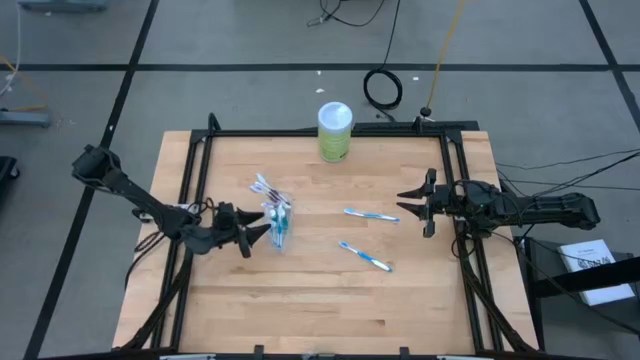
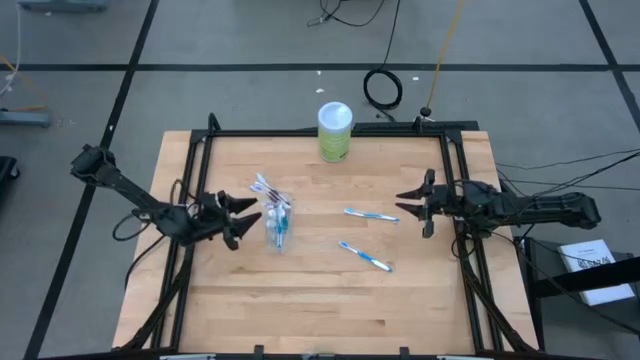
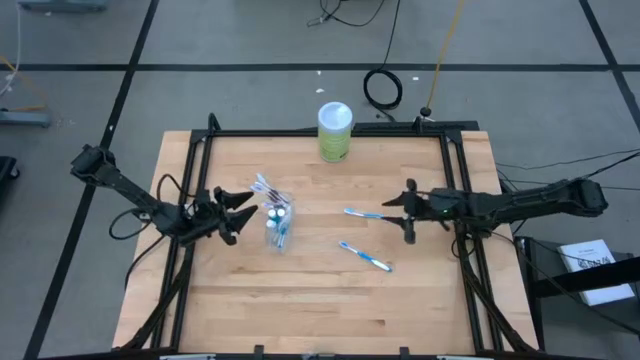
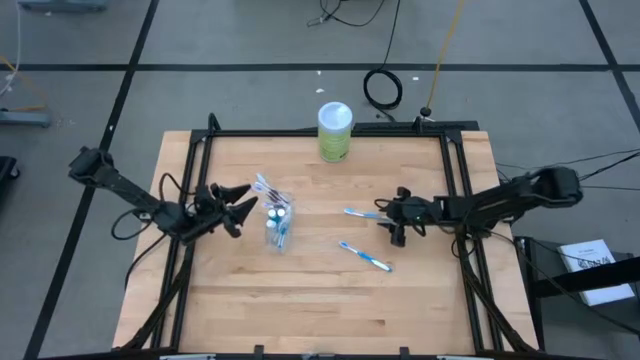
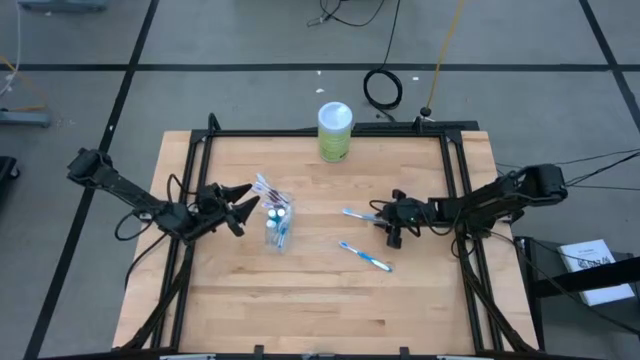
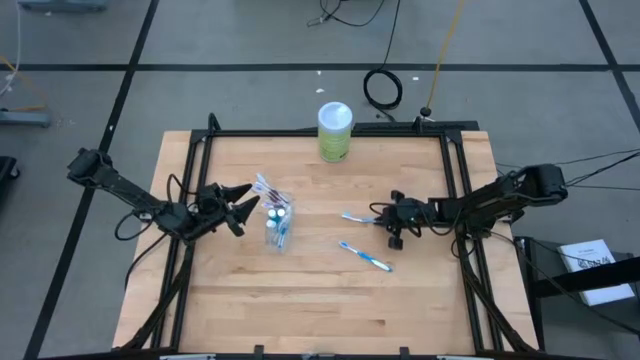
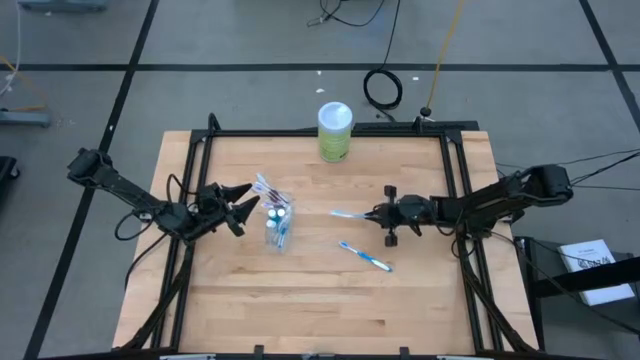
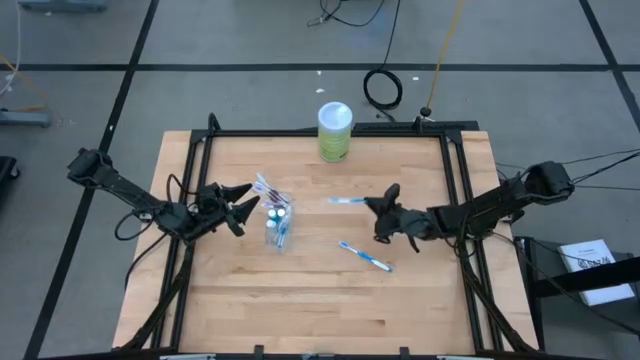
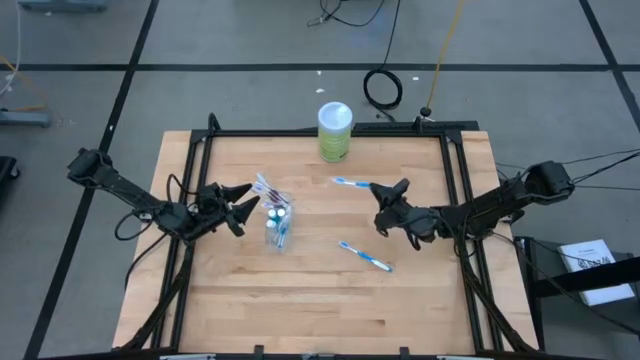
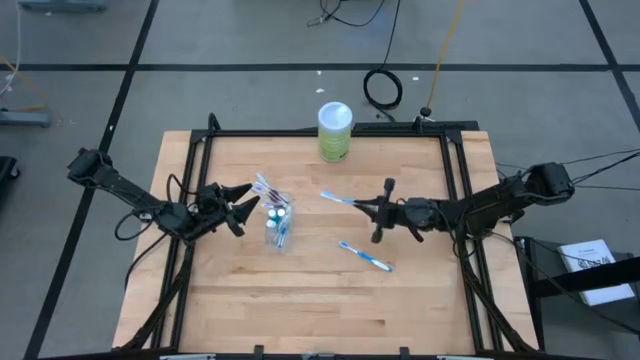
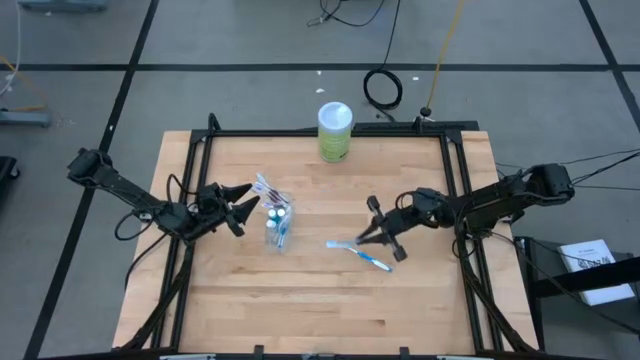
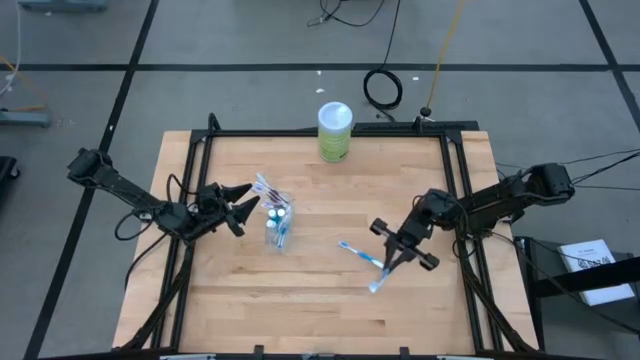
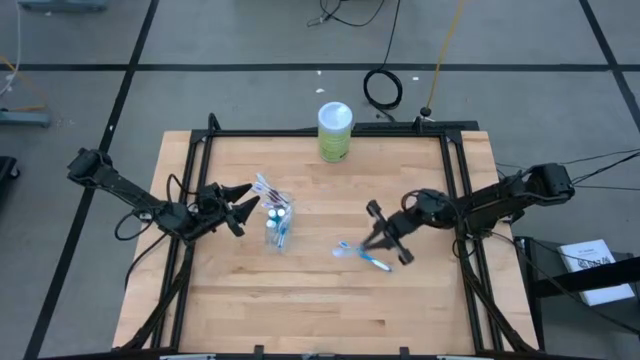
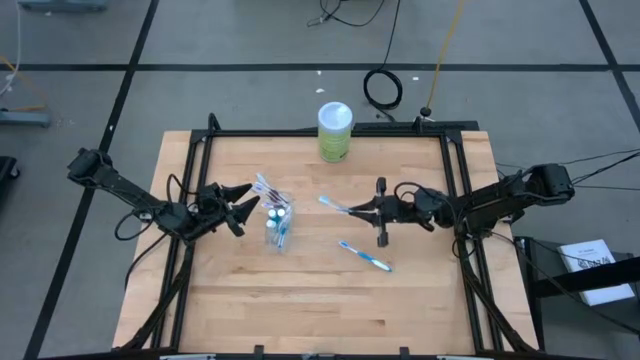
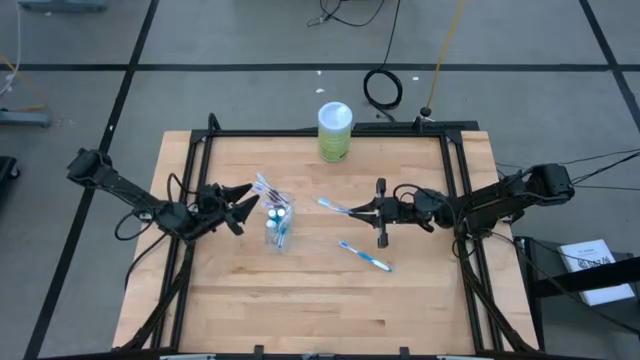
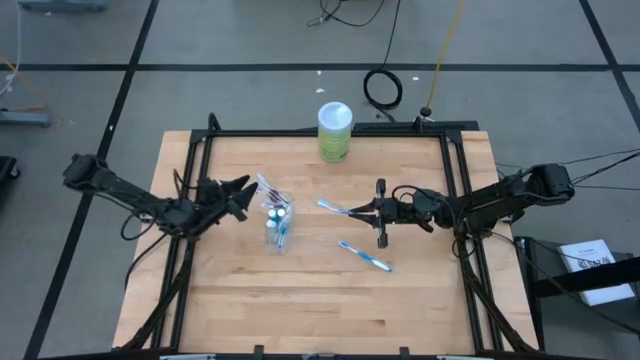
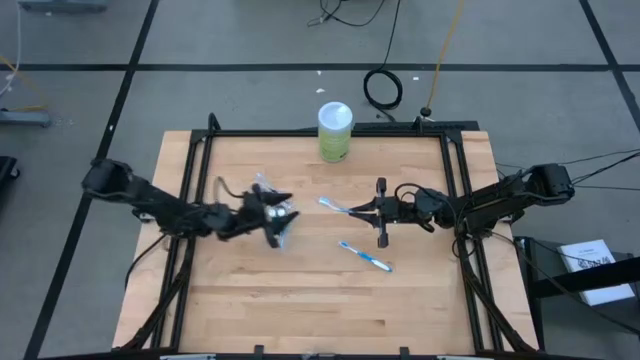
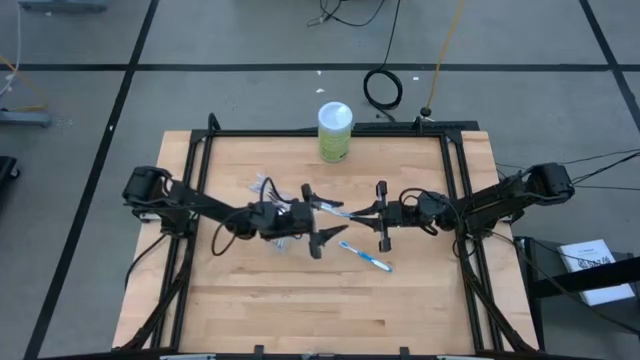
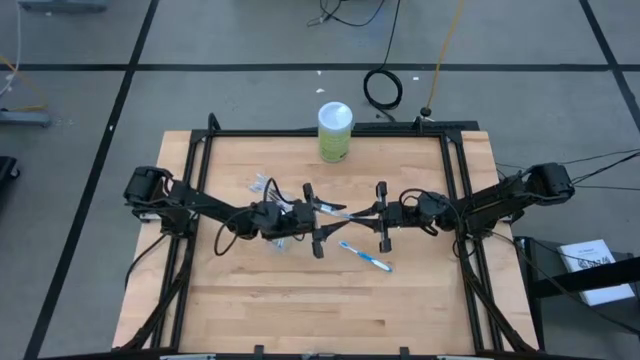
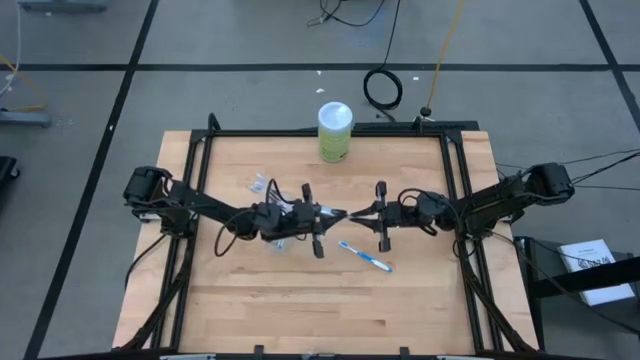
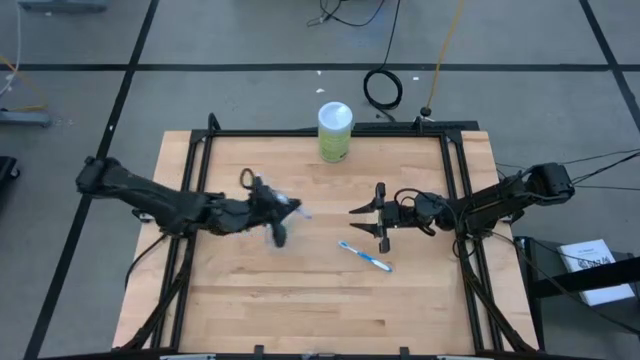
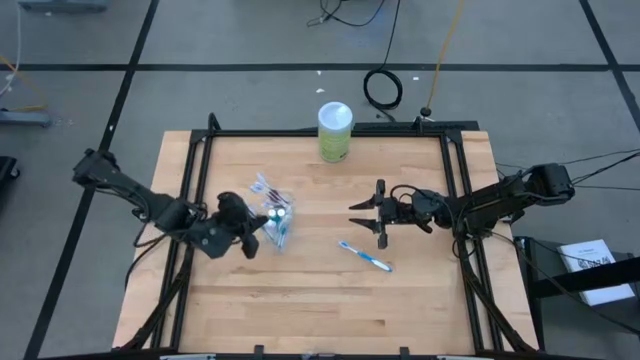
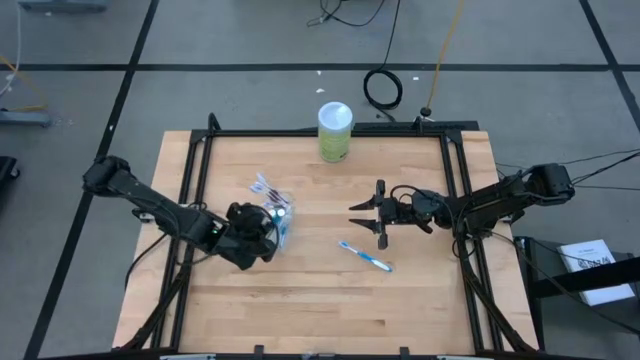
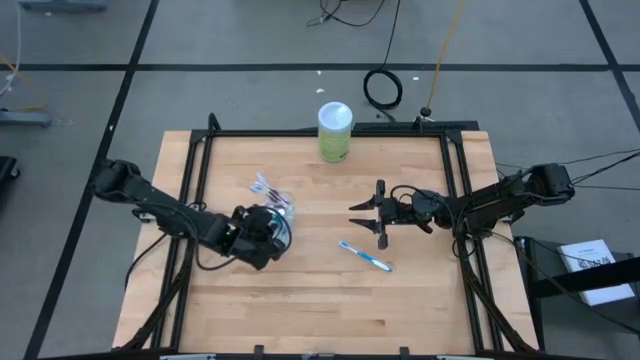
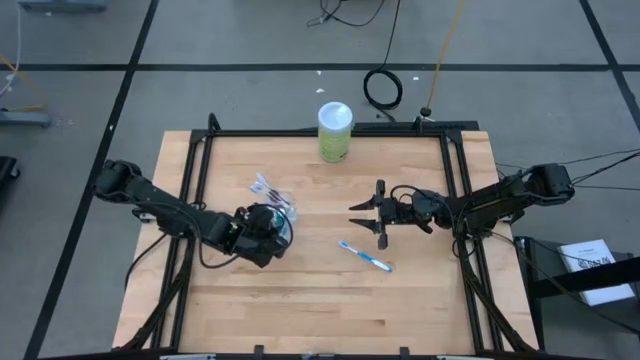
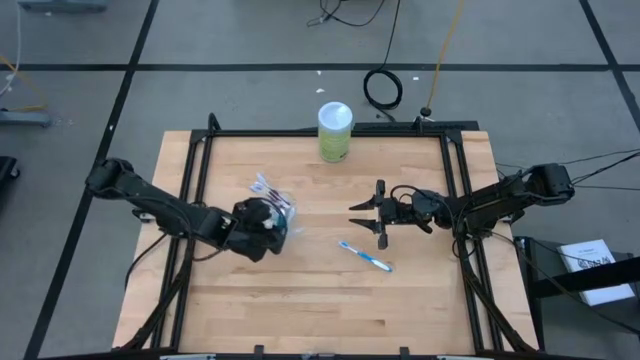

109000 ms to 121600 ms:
Task: Pick & Place toothbrushing station
Put the blue toothbrush into the transparent organizer

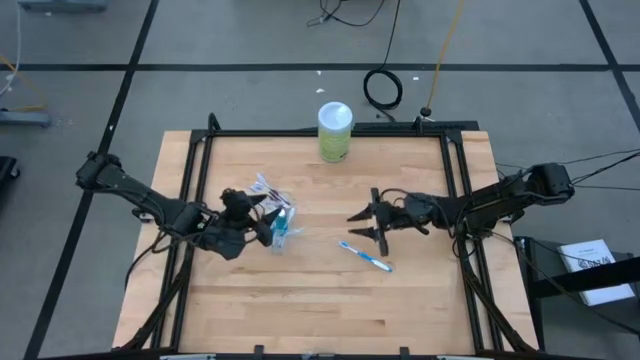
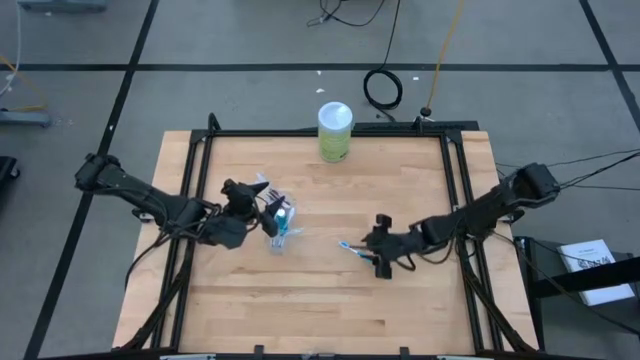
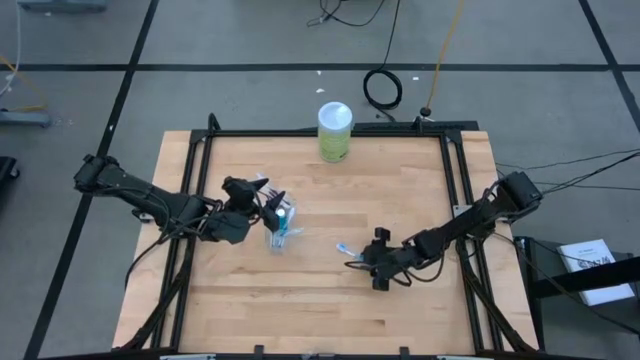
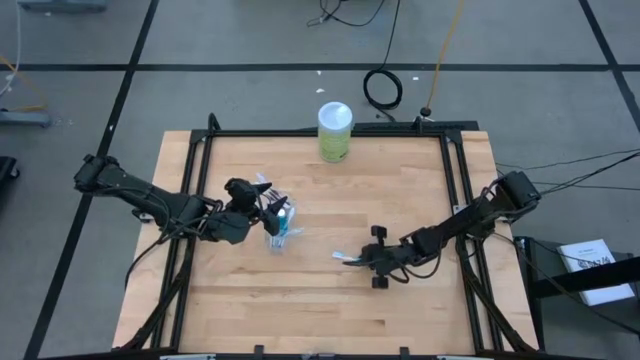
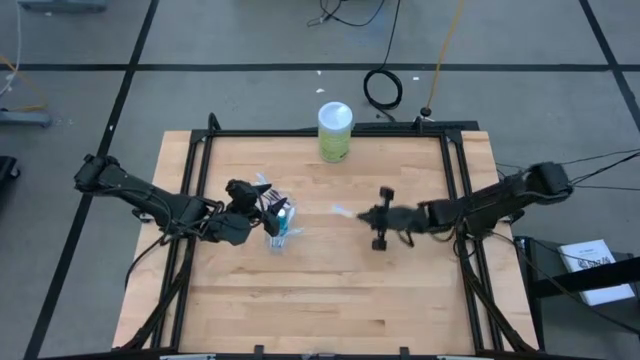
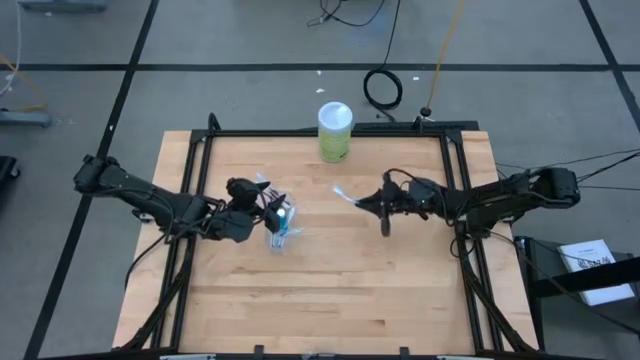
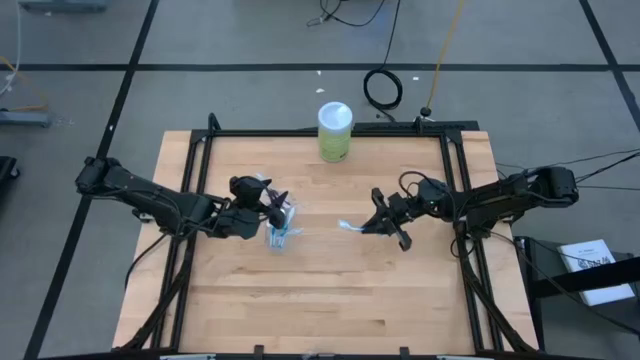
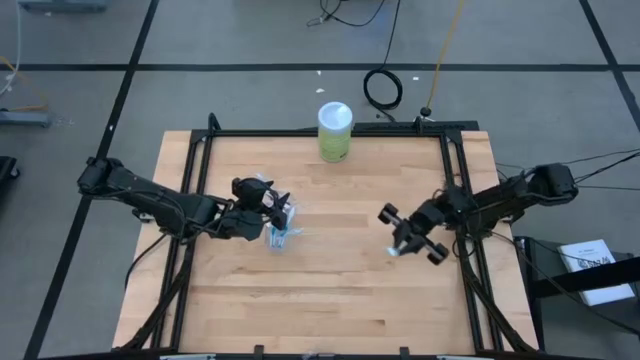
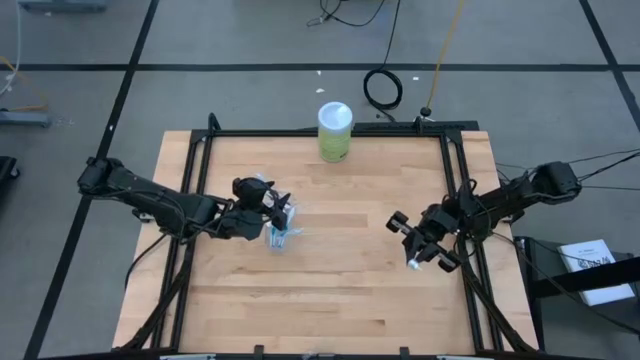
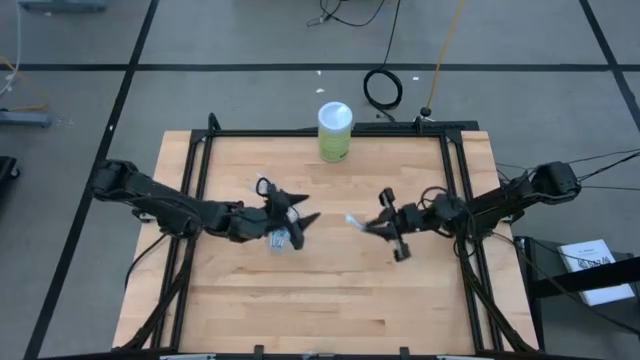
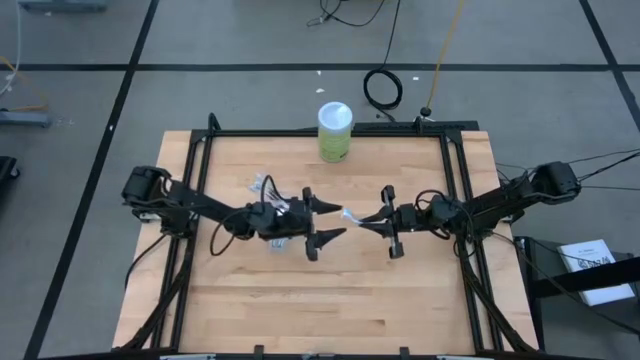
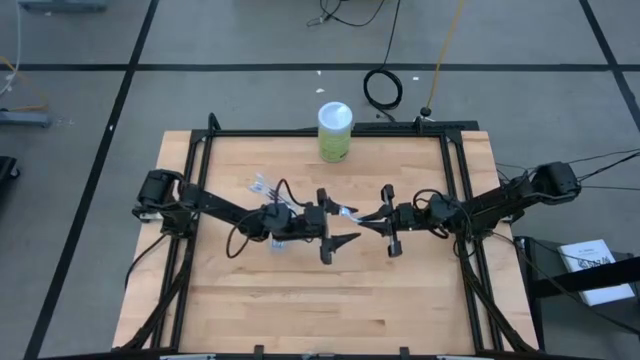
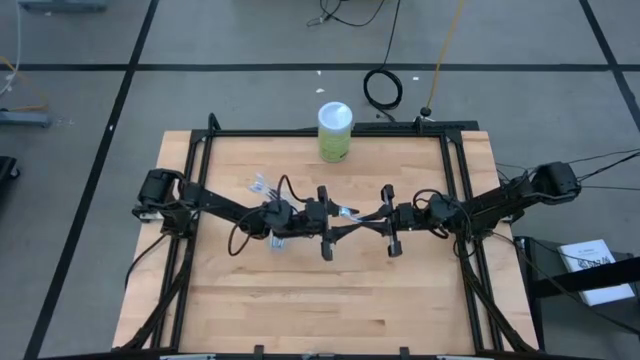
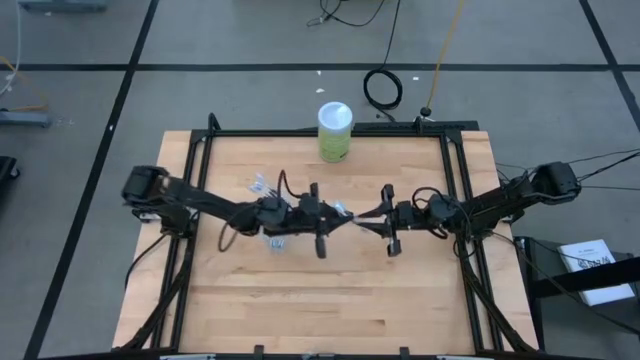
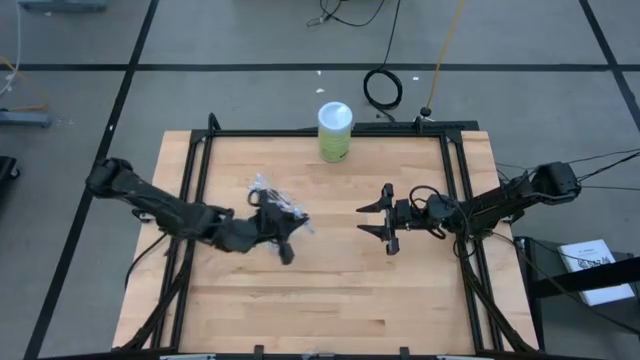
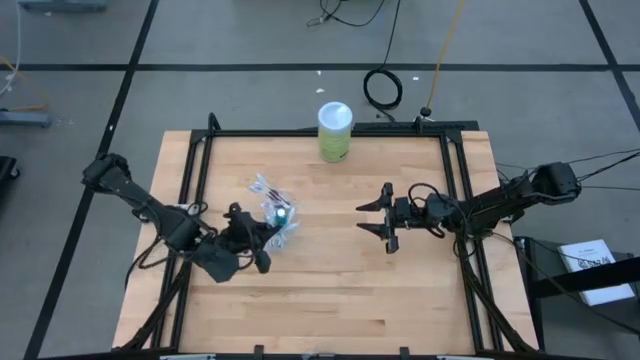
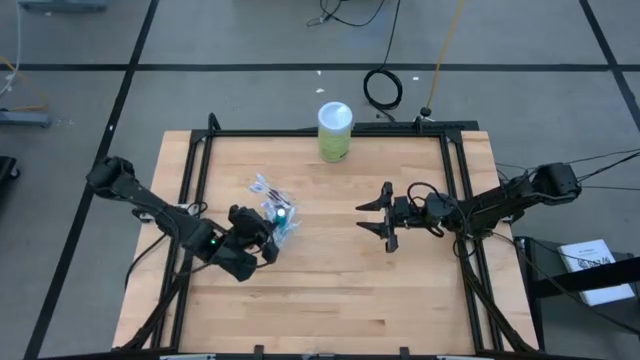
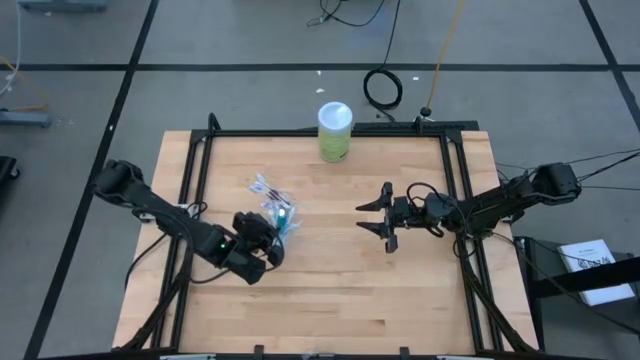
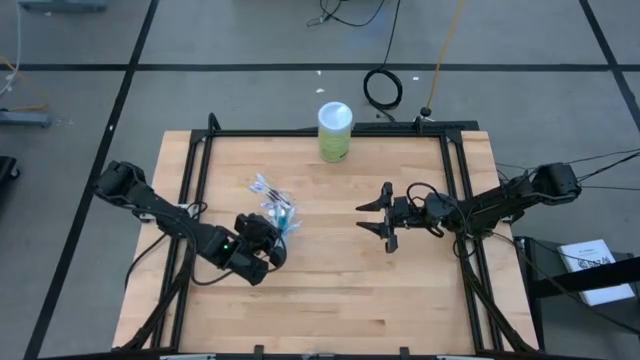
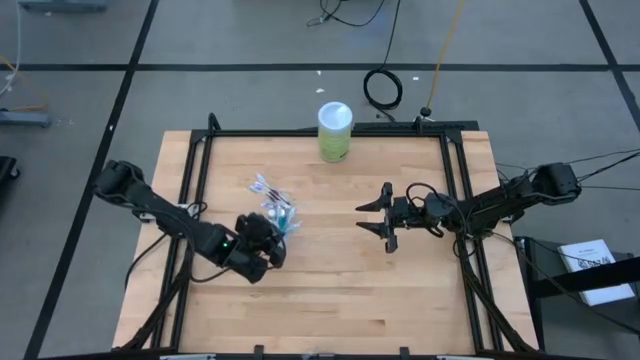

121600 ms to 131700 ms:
Put the blue toothbrush into the transparent organizer
